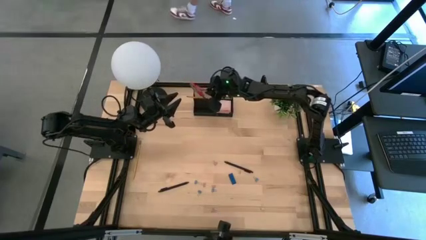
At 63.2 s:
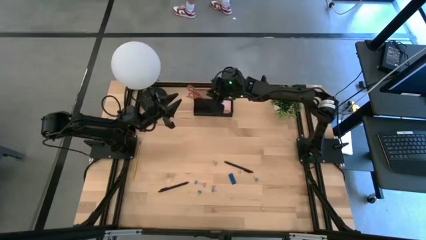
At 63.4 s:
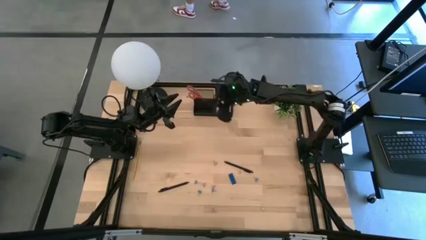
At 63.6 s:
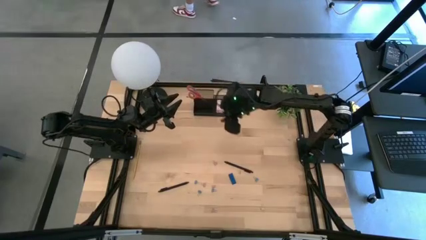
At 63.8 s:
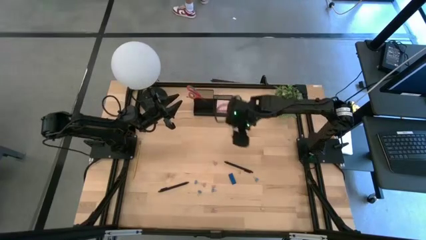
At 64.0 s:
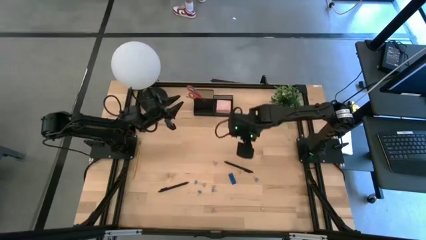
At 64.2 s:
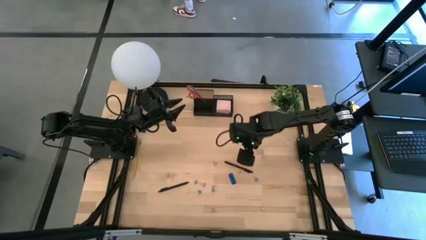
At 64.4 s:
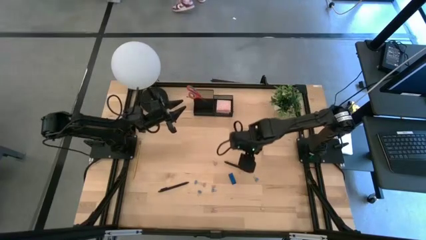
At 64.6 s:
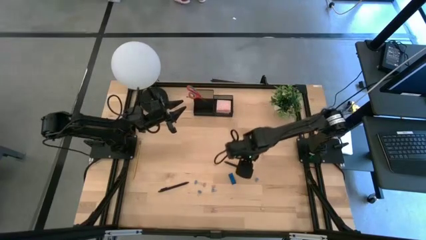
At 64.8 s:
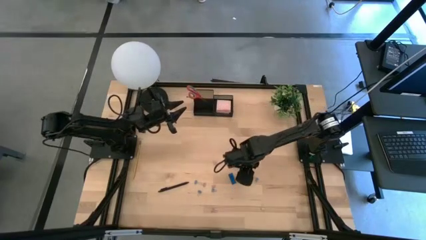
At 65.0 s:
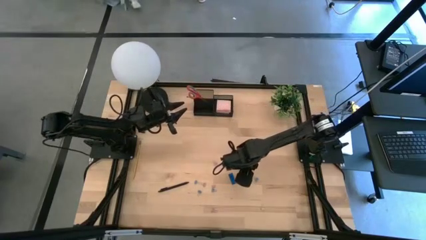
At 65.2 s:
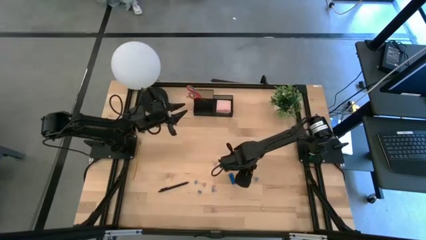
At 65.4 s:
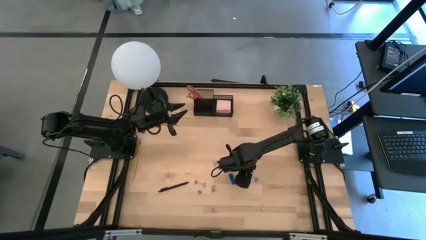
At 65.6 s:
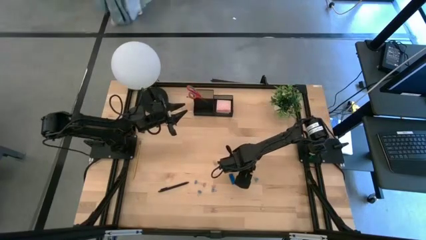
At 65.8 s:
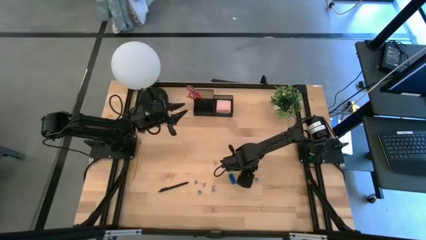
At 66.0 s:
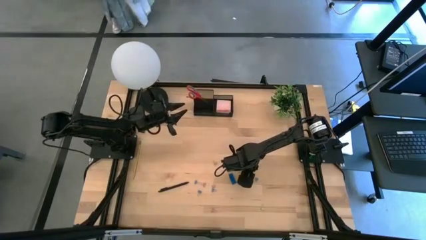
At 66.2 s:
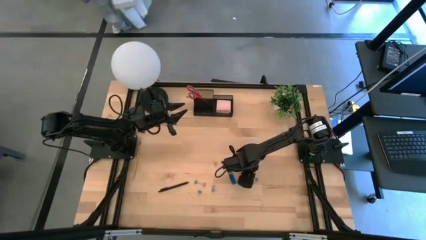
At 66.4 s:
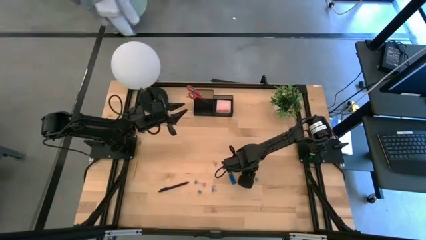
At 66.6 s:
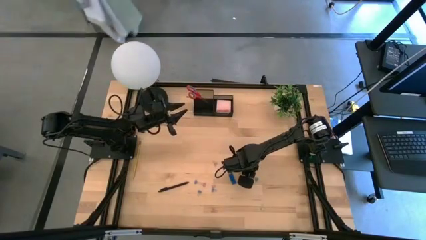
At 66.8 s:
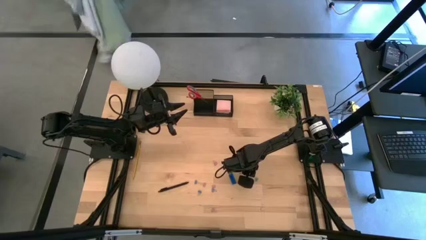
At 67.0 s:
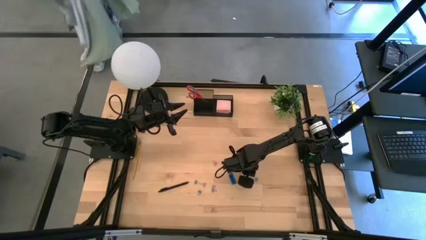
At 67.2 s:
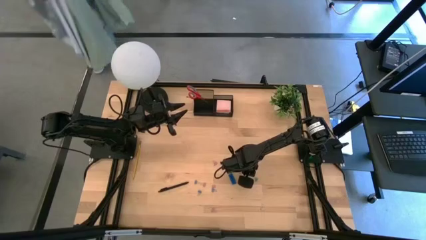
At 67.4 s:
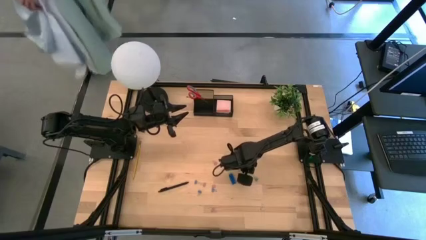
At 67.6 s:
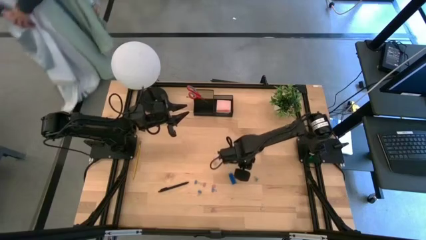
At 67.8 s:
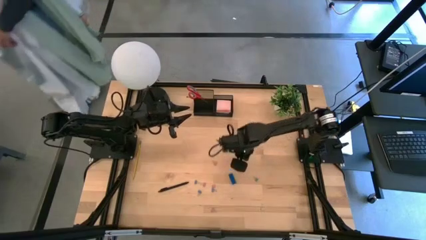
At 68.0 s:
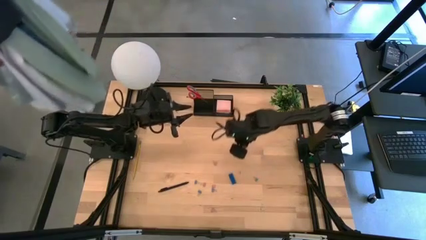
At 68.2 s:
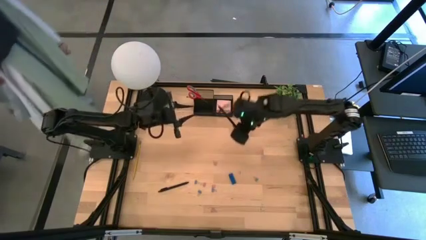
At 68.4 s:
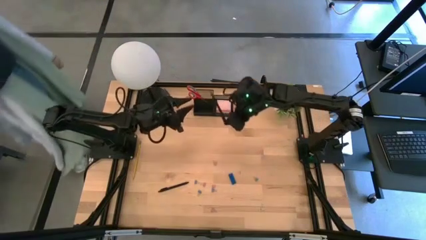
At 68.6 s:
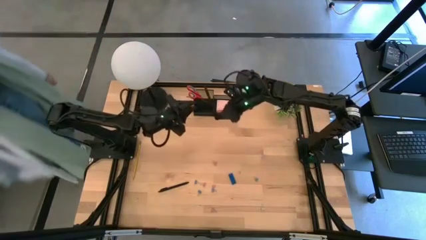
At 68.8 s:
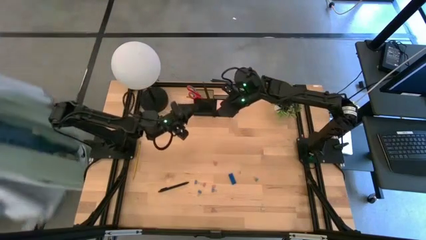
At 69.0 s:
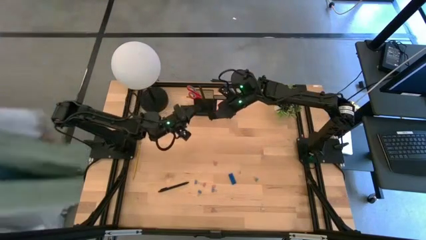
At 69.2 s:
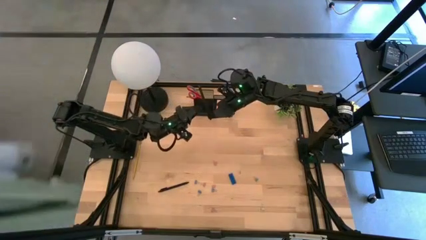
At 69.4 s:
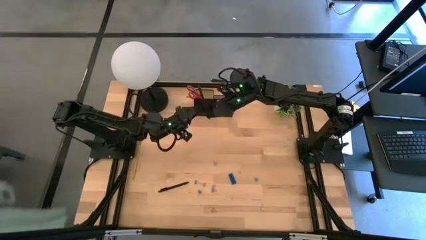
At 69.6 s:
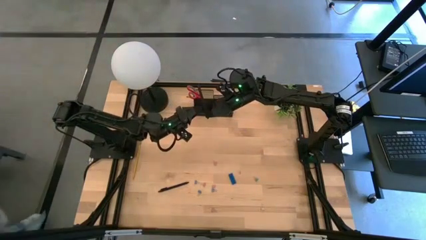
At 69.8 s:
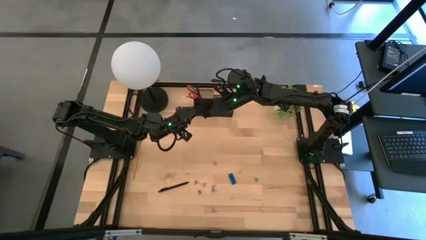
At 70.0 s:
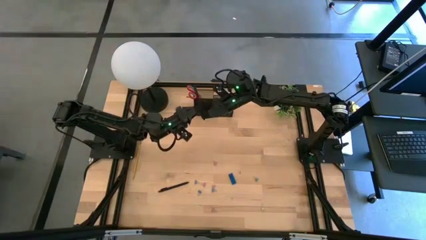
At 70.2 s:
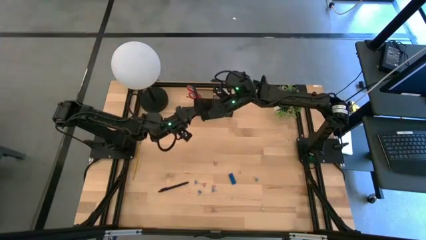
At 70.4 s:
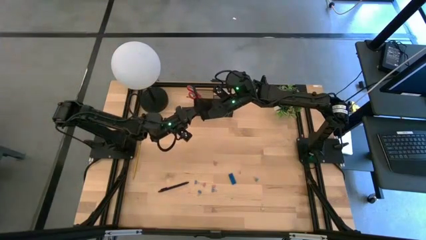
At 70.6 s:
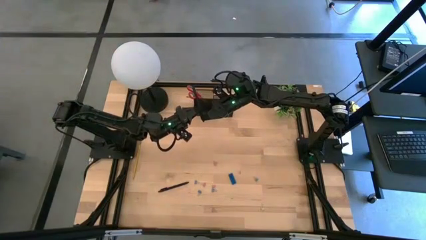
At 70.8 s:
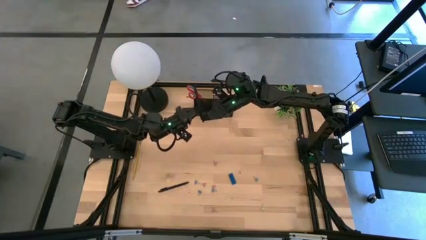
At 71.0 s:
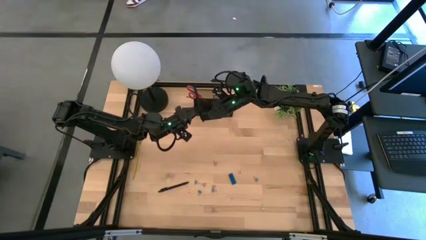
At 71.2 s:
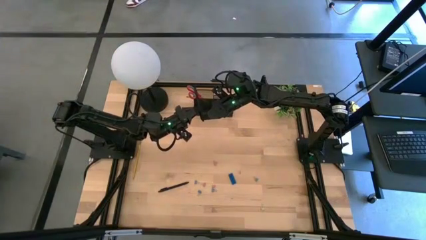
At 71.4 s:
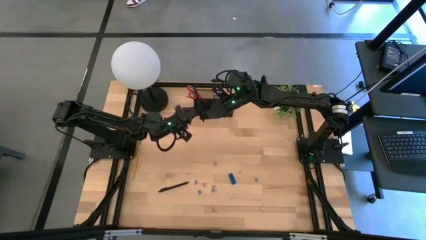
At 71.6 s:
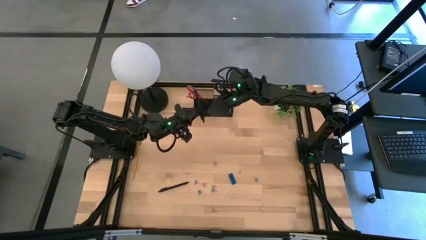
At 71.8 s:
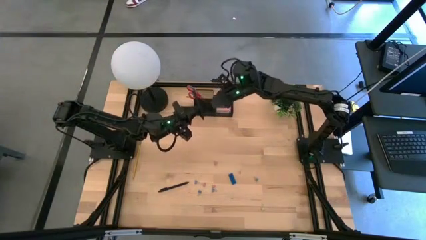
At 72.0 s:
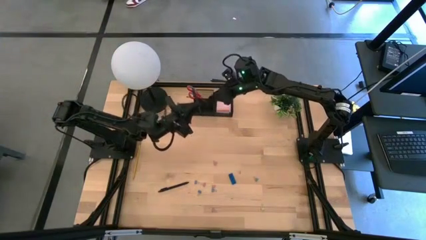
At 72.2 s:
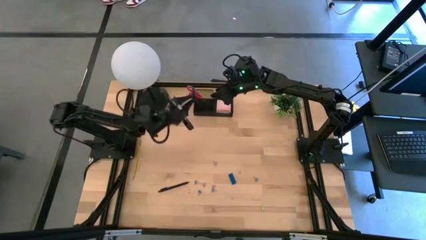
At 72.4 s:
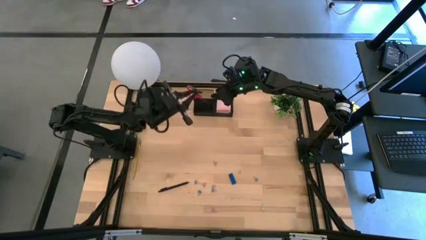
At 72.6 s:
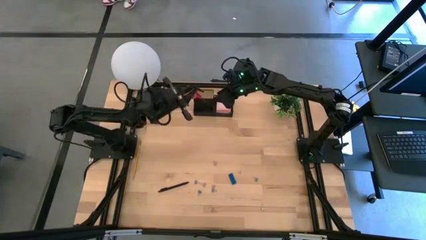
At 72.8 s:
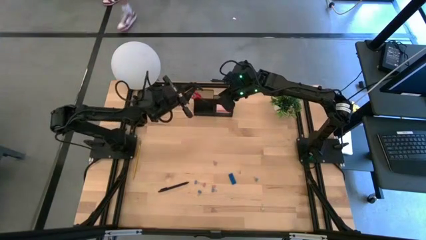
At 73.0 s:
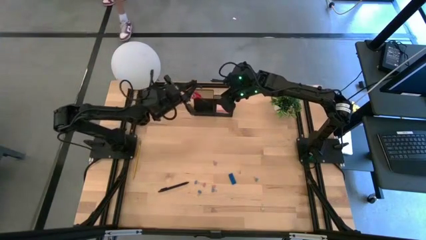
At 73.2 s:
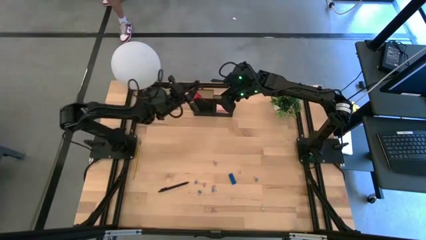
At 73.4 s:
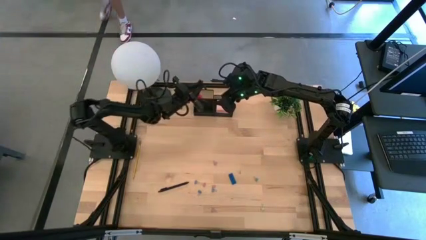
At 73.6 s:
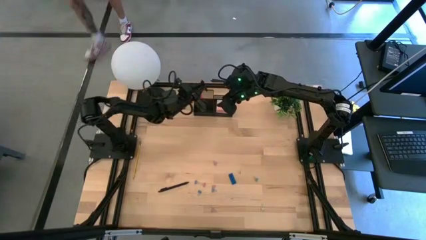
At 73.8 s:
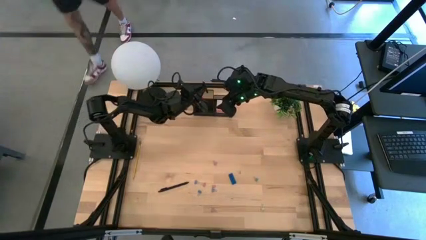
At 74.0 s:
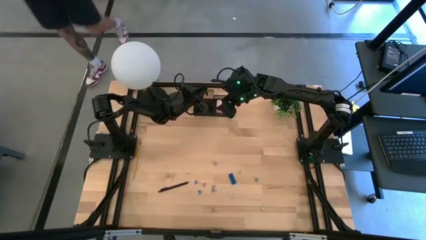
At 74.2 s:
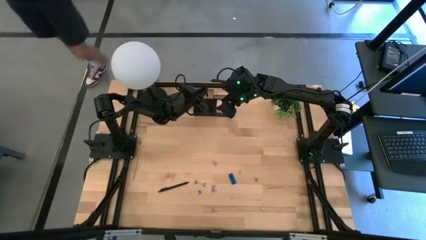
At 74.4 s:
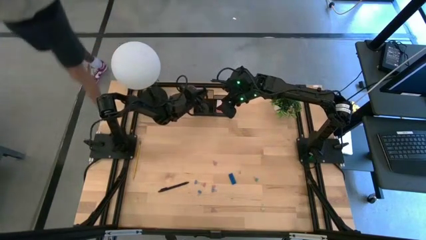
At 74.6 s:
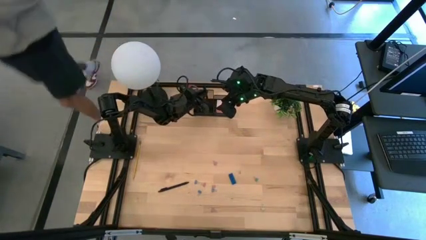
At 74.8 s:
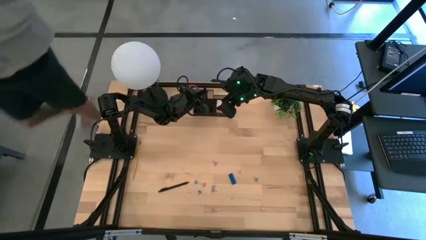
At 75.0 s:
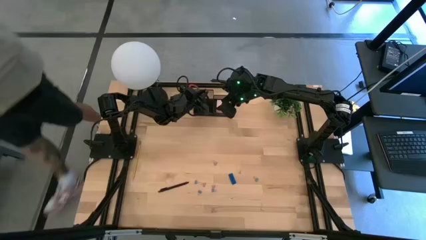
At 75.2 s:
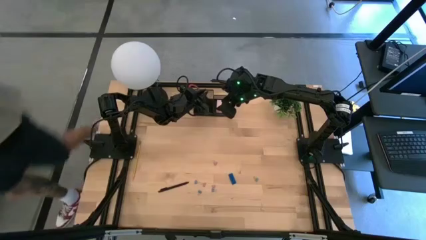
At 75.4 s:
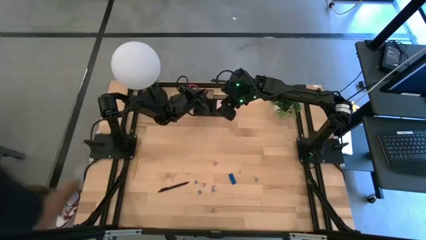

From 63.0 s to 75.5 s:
Task: Pick and place office supplies into organizer
Put the black pen into the black desk organizer
